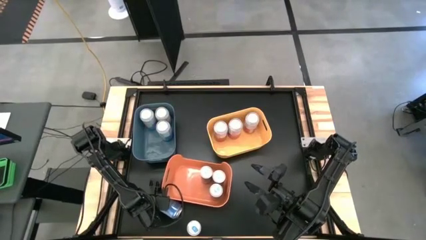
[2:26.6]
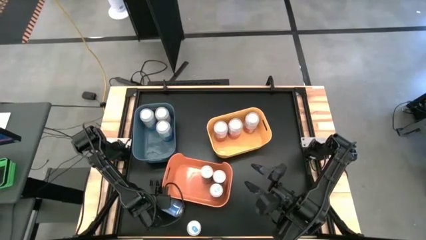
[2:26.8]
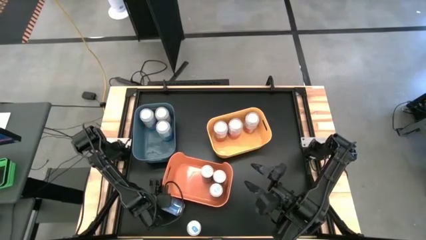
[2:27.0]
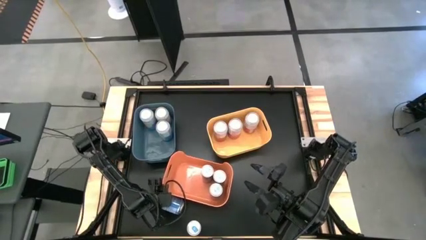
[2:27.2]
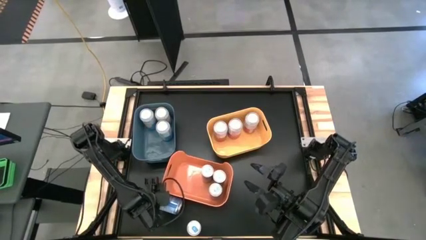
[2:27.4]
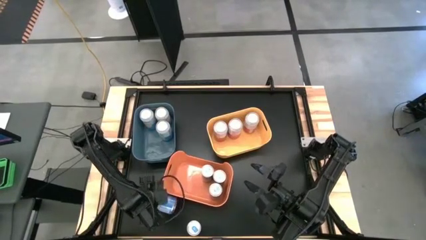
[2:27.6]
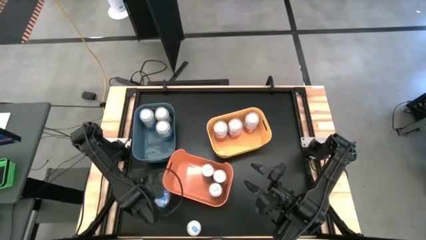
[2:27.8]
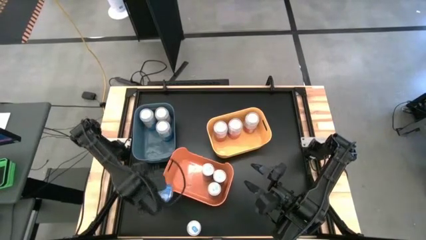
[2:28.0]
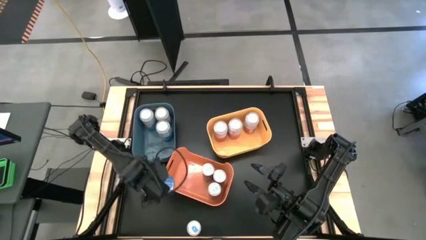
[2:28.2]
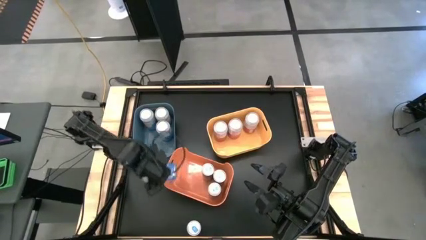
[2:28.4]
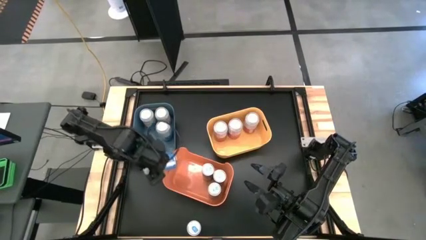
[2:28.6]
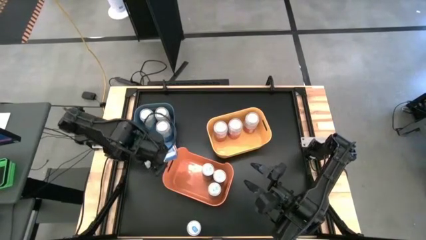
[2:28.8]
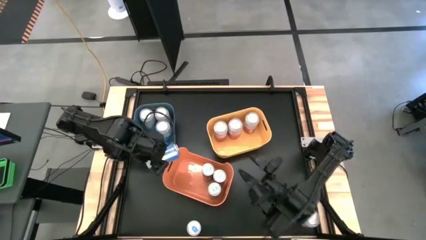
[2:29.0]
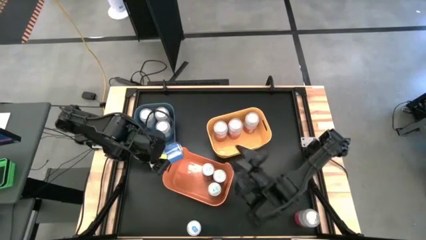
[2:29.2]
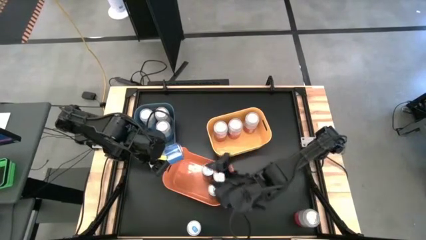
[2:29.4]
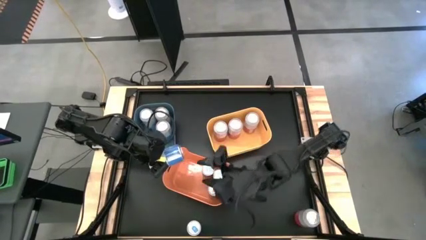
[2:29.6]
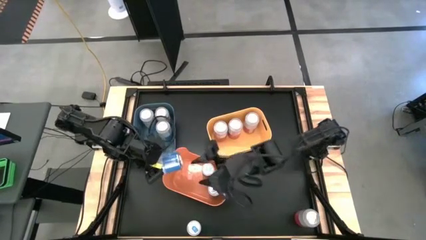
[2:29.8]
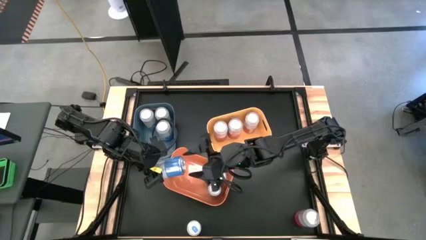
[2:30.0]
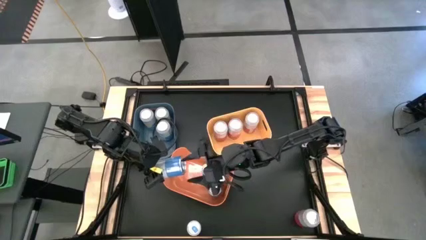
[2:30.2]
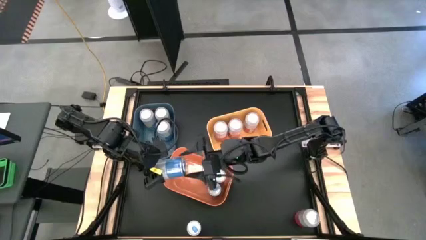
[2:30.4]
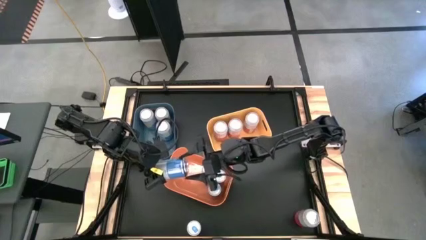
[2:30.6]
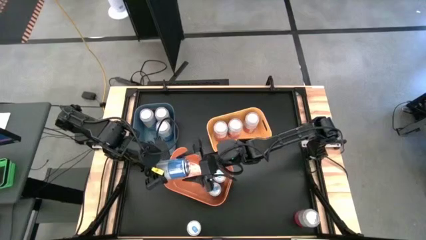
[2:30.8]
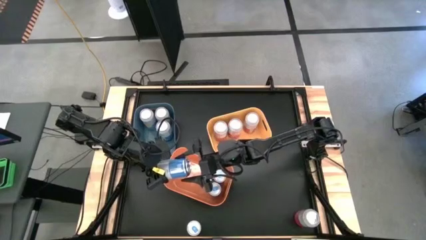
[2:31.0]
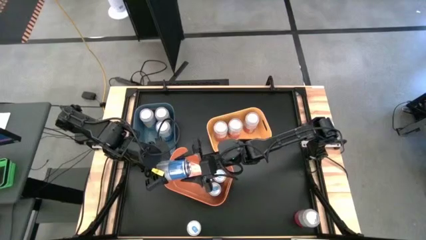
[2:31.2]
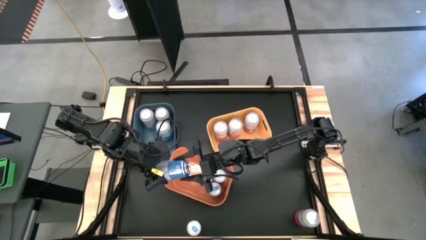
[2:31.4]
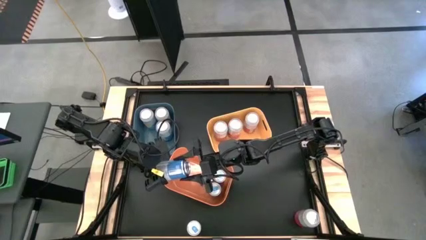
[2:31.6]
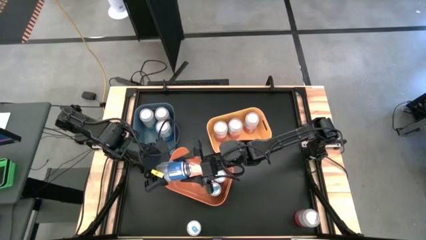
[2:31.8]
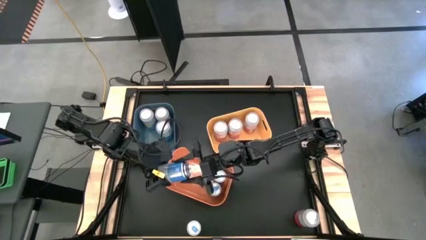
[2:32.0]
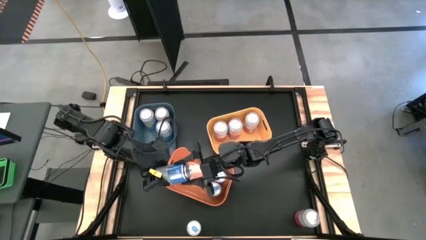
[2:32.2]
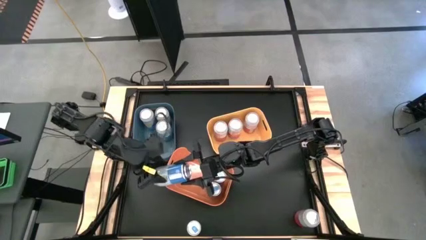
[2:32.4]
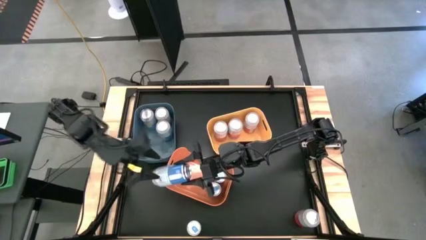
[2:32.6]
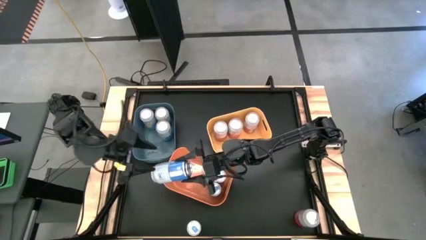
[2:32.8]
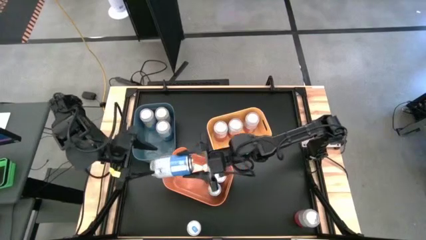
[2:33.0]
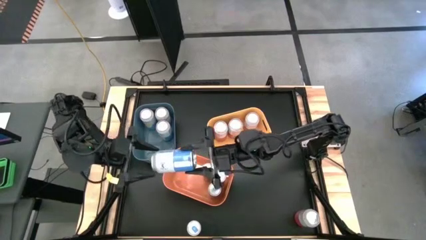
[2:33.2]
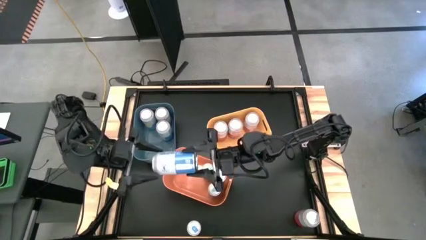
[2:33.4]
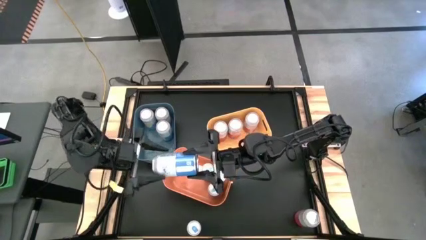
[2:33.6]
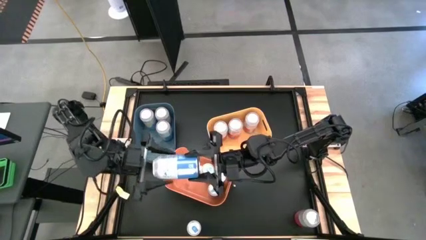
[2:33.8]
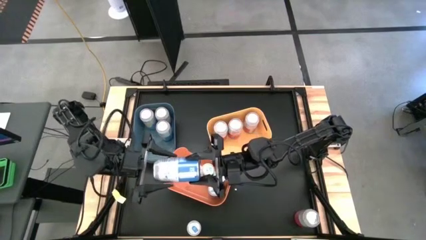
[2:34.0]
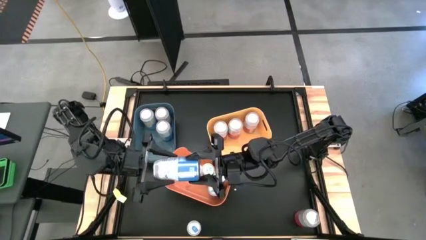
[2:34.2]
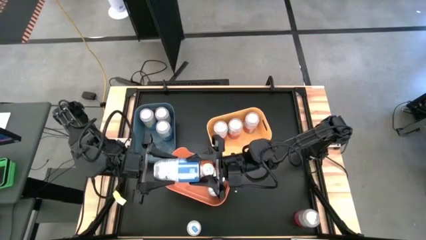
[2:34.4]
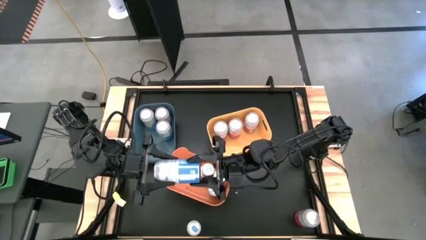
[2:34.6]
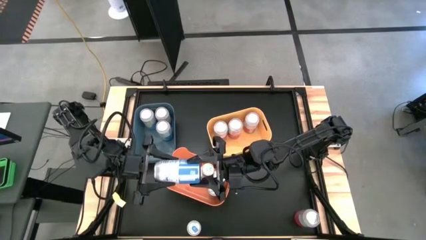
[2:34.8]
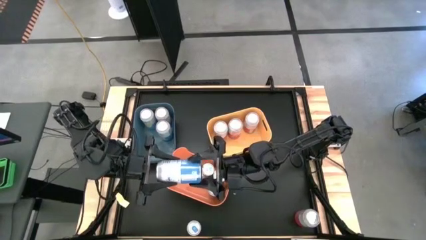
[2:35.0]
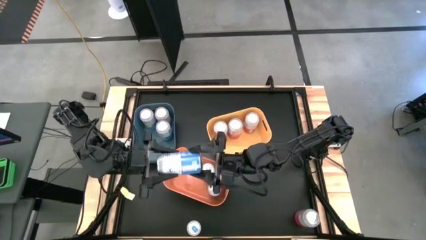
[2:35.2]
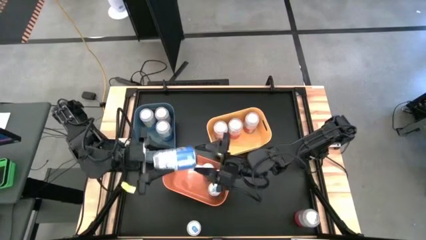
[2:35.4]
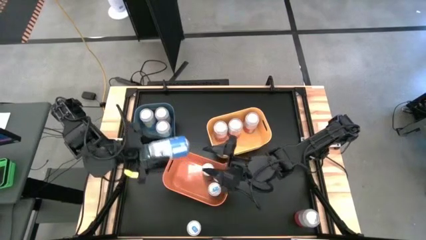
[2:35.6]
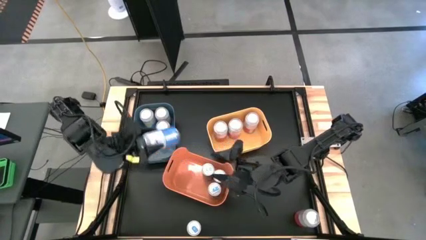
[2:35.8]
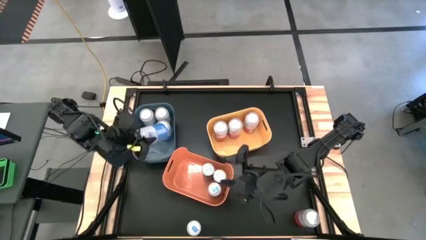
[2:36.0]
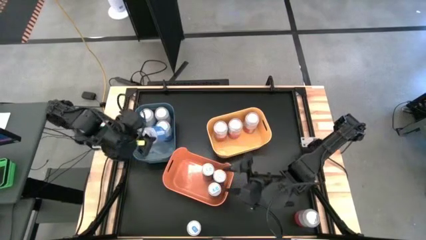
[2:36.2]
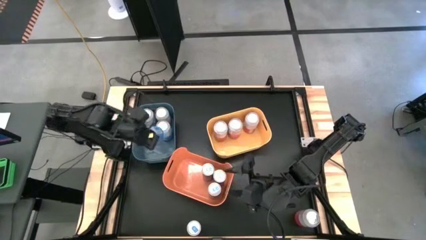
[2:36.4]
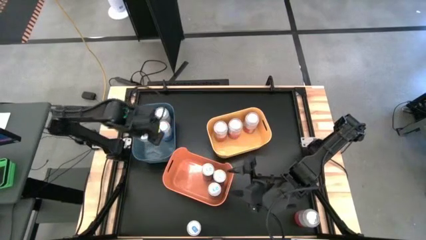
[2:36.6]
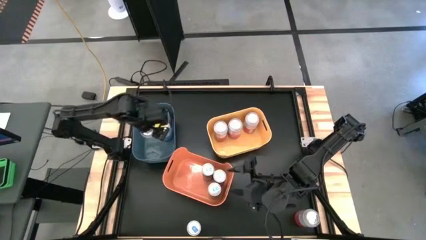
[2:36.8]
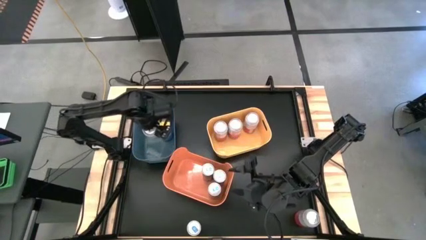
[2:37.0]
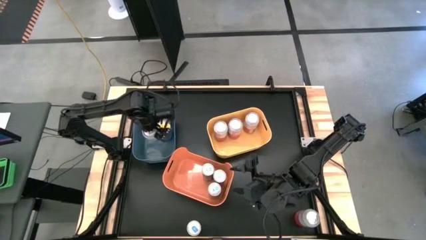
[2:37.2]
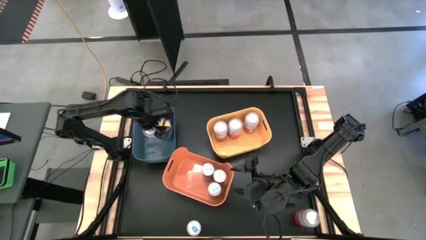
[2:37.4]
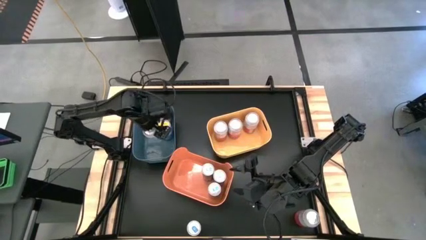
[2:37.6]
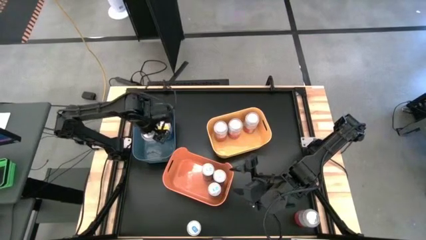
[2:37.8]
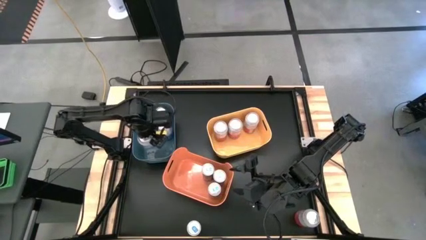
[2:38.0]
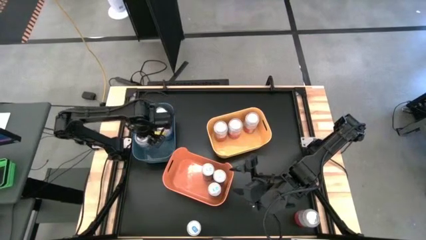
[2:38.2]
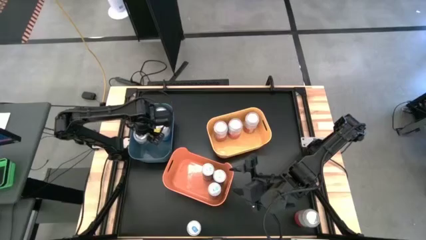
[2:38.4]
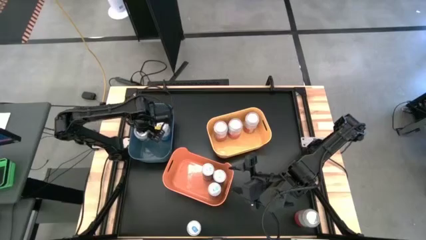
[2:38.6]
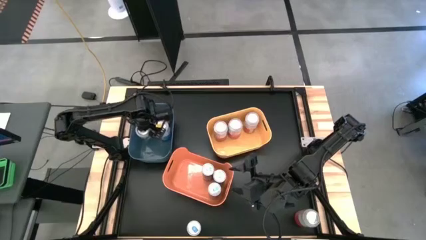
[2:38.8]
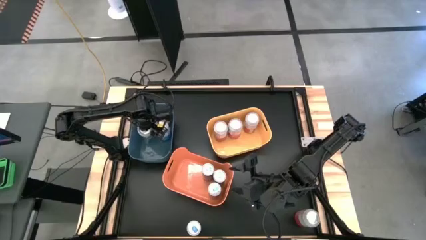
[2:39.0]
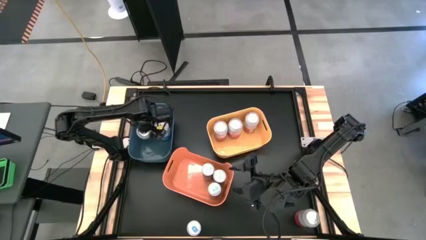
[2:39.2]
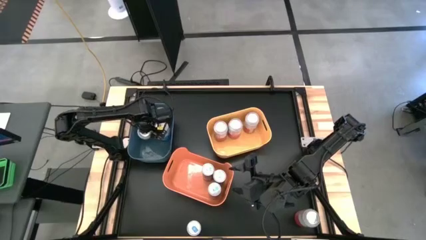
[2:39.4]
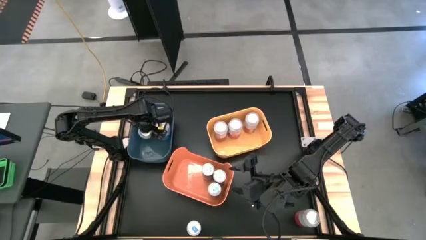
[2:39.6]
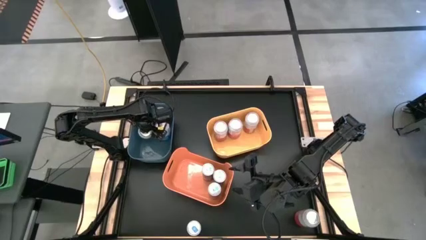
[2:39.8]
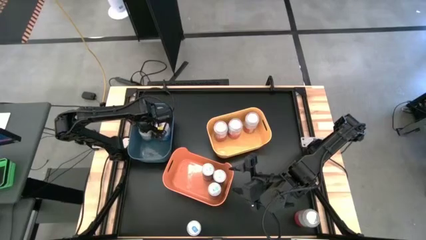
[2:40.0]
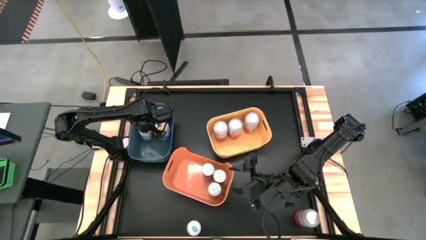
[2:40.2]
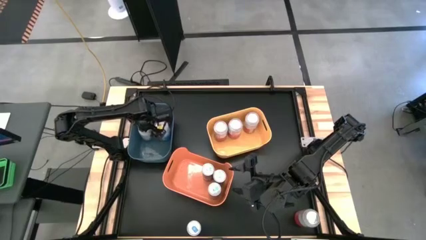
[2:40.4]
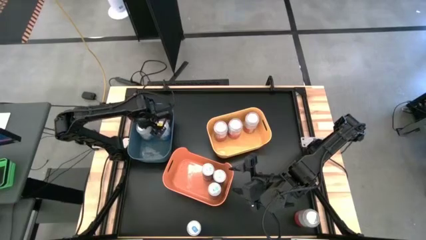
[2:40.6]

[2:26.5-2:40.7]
Task: Sort soda cans
Put the blue soda can into the blue bin

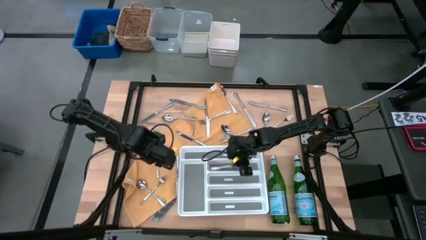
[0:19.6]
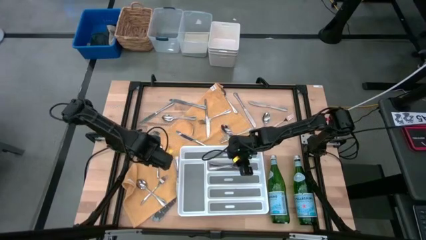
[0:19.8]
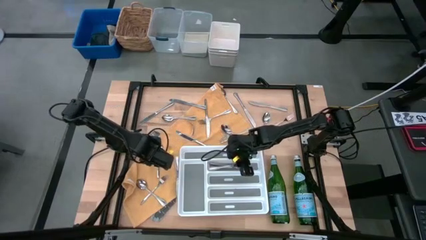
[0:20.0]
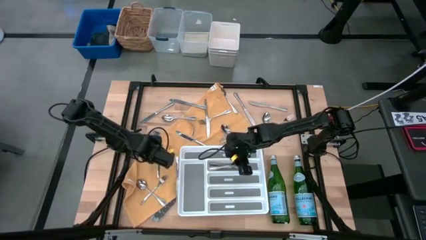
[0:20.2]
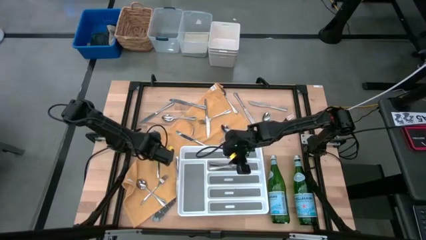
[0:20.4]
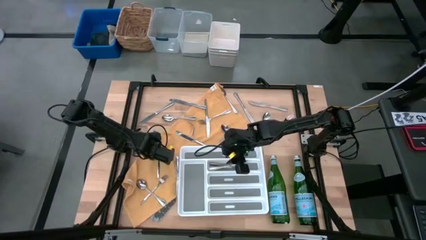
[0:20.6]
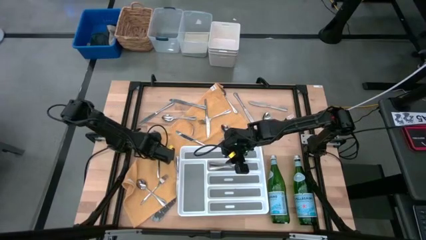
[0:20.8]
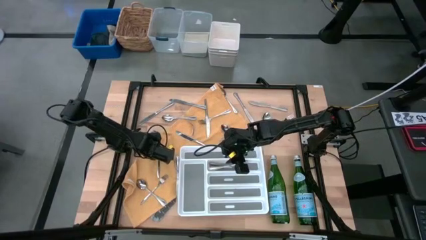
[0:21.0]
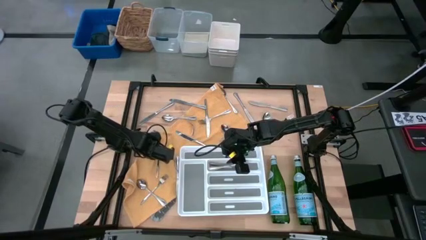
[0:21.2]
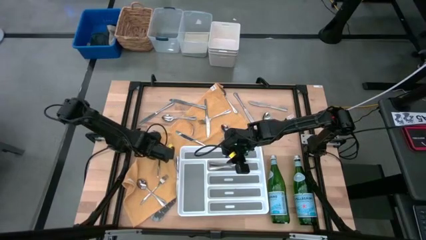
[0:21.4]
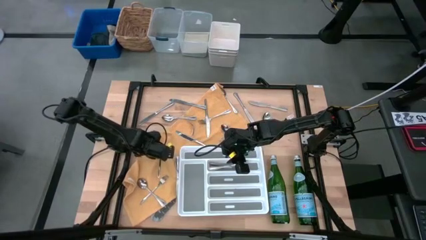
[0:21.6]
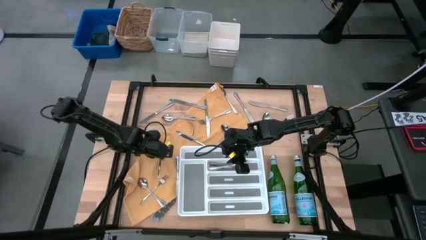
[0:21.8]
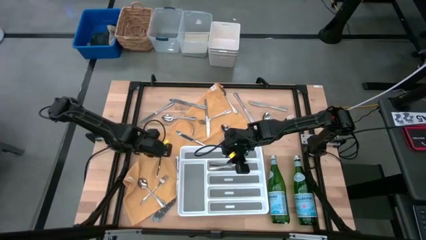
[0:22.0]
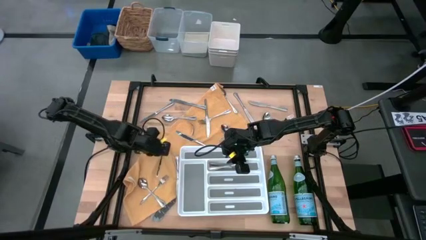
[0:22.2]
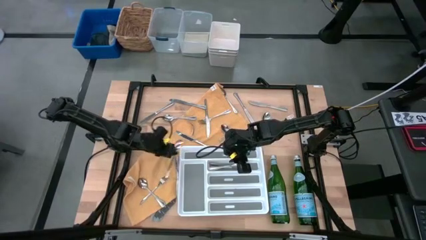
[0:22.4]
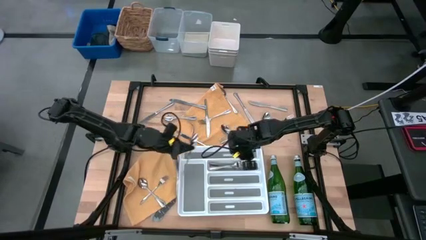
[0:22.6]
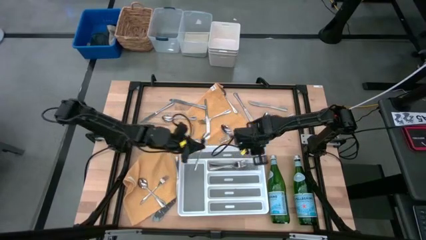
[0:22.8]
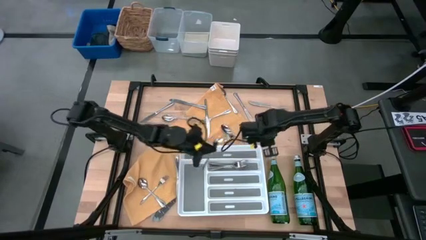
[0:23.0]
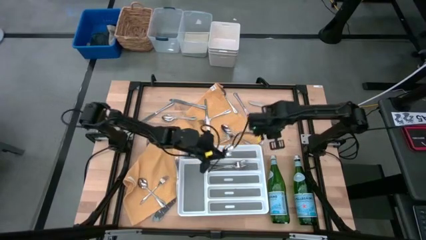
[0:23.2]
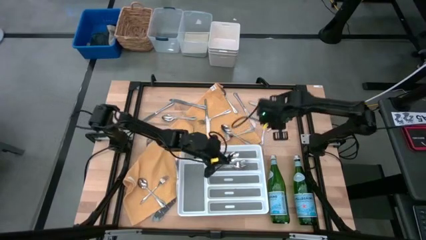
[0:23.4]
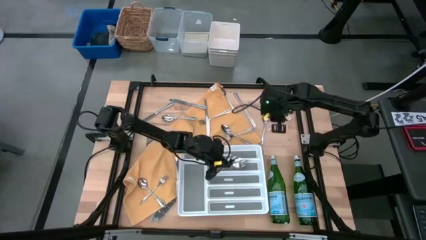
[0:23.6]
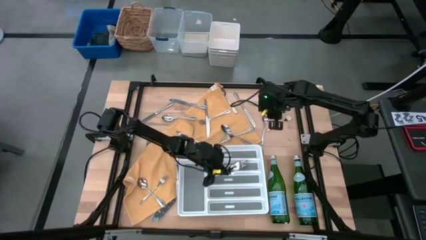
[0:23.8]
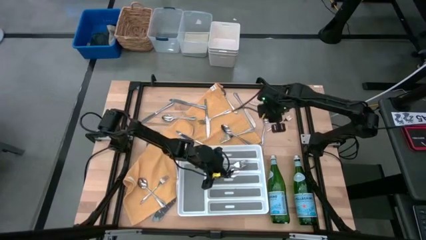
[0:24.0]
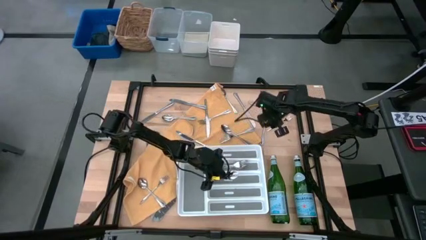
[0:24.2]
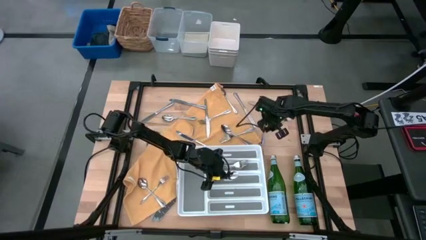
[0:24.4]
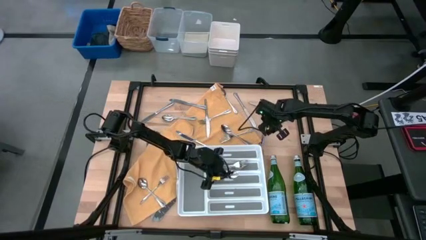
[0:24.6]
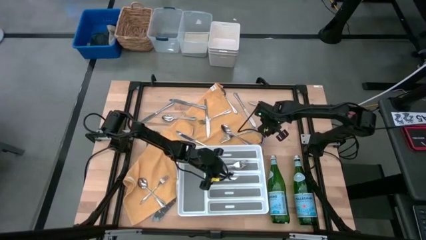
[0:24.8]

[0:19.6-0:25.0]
Task: Sort silverware
Put the silver spoon into the white silverware tray
